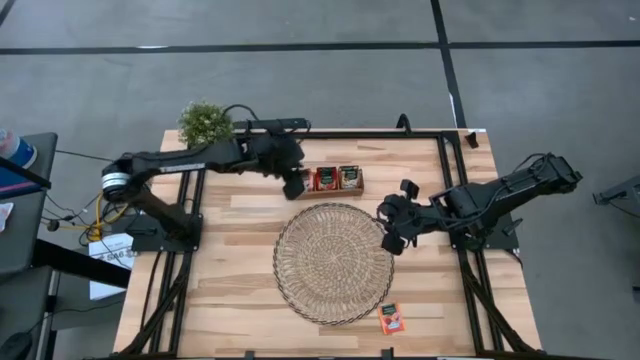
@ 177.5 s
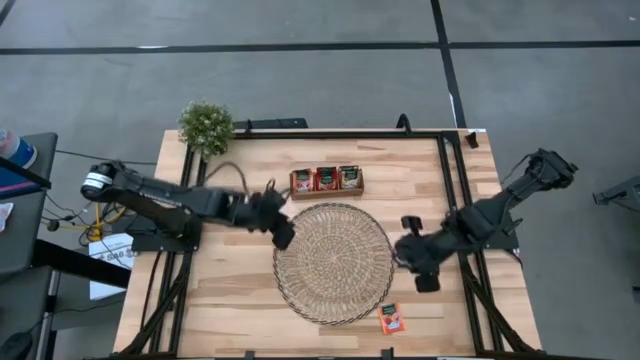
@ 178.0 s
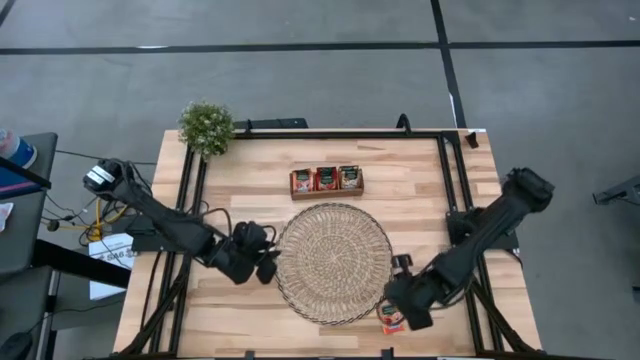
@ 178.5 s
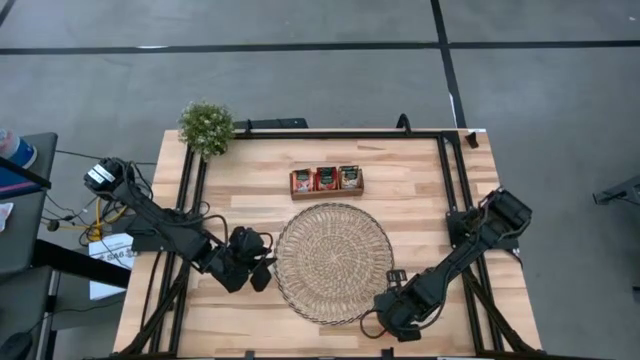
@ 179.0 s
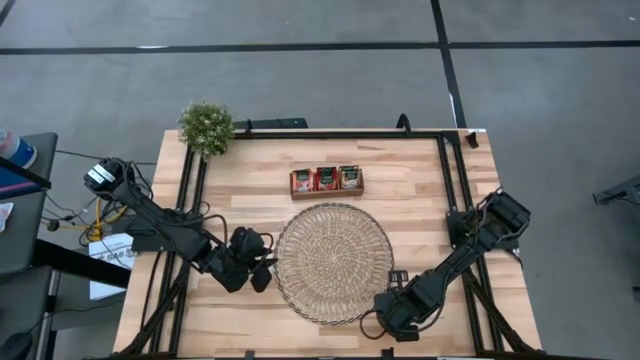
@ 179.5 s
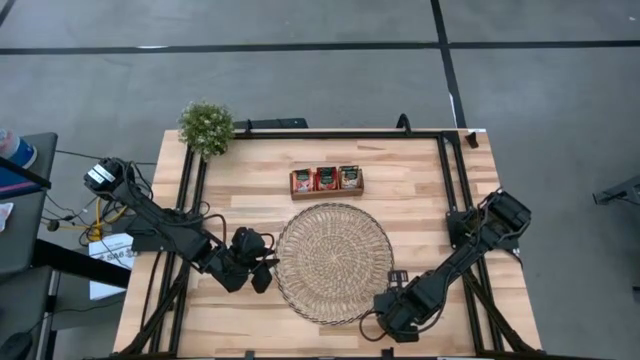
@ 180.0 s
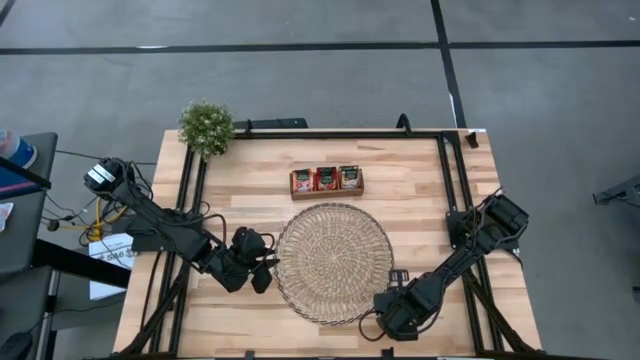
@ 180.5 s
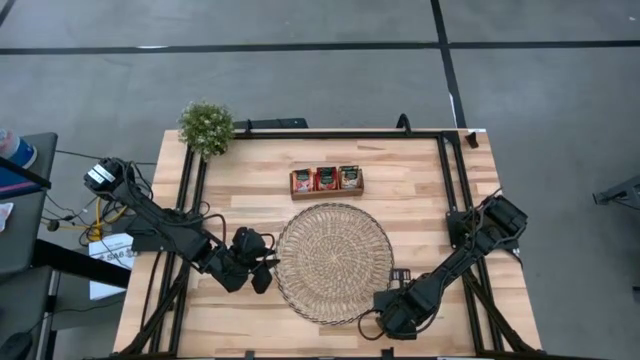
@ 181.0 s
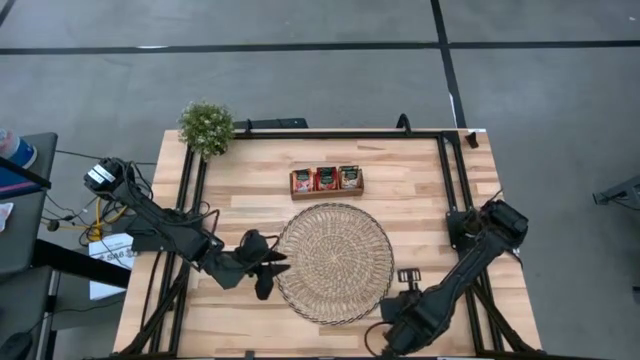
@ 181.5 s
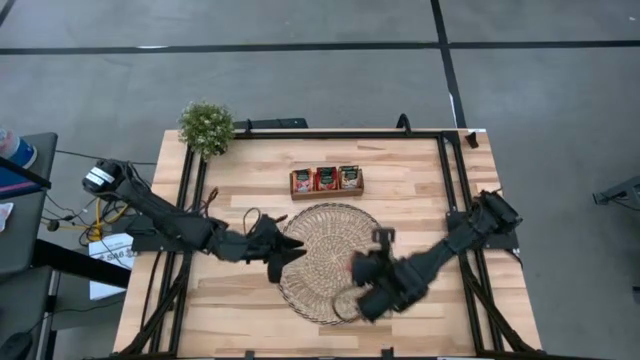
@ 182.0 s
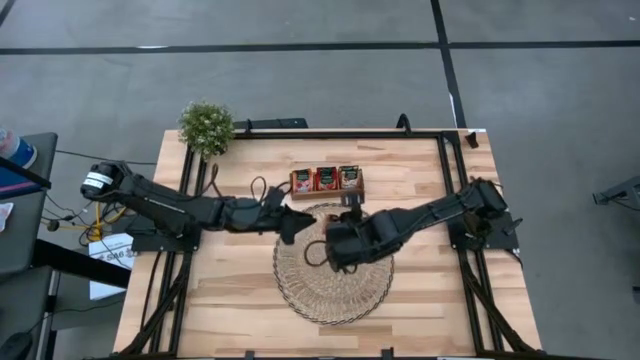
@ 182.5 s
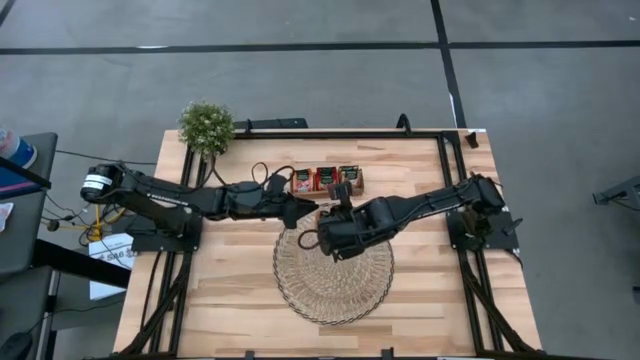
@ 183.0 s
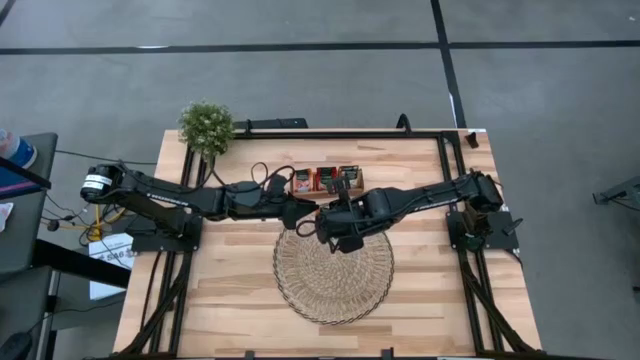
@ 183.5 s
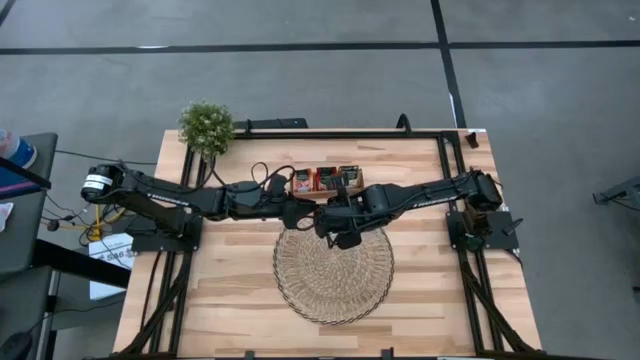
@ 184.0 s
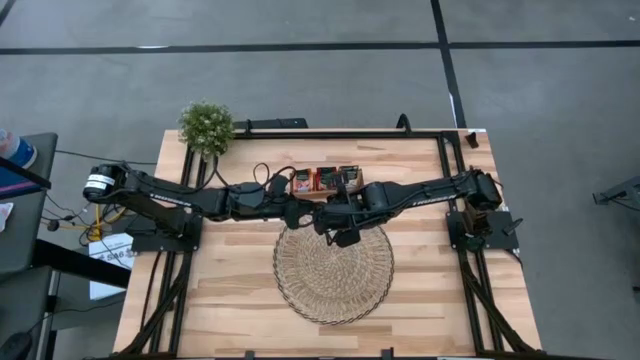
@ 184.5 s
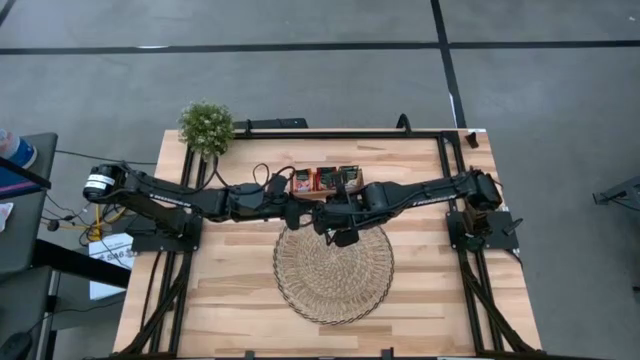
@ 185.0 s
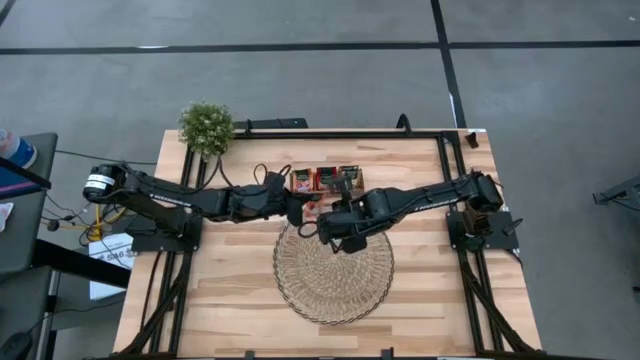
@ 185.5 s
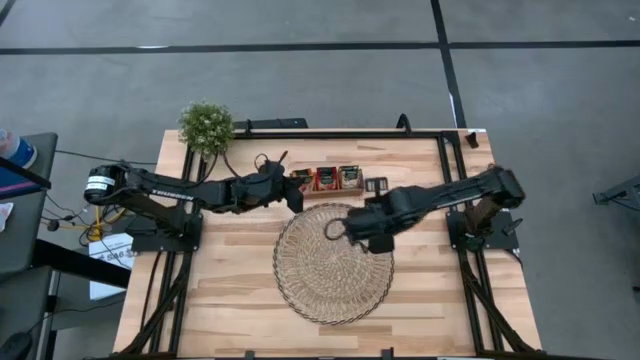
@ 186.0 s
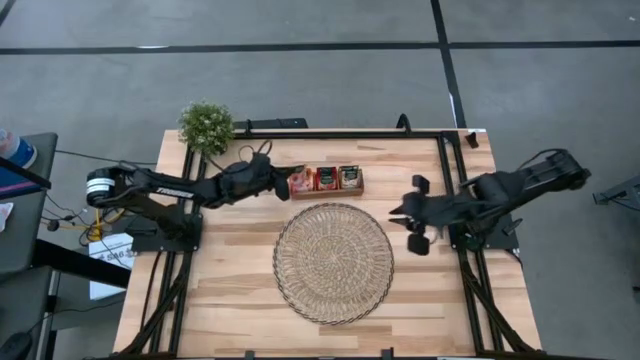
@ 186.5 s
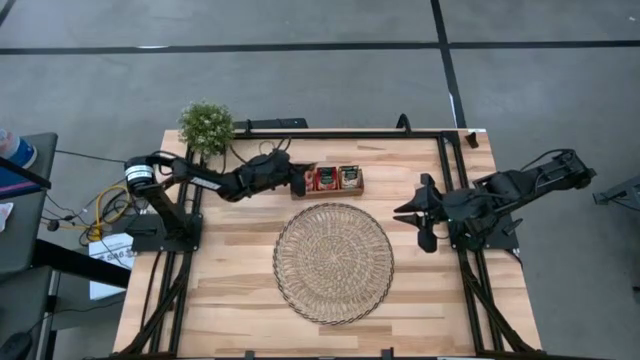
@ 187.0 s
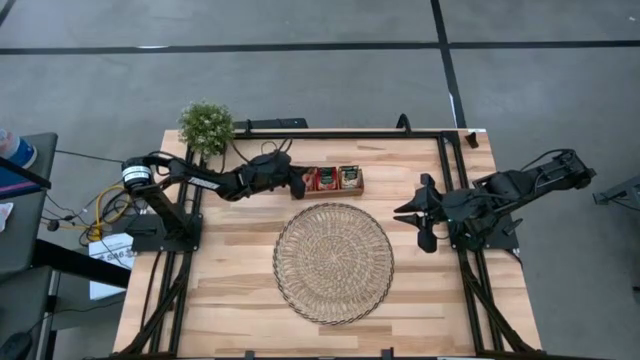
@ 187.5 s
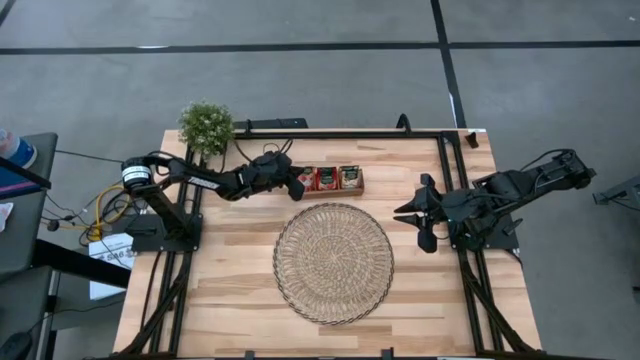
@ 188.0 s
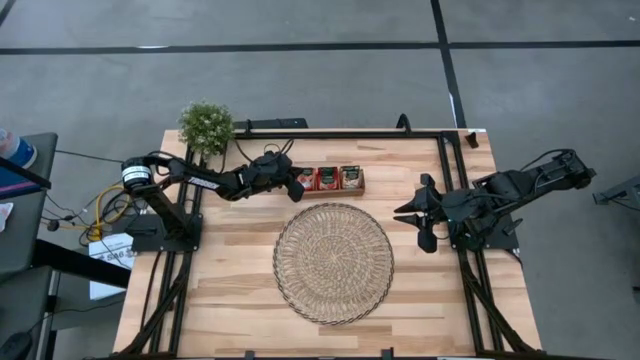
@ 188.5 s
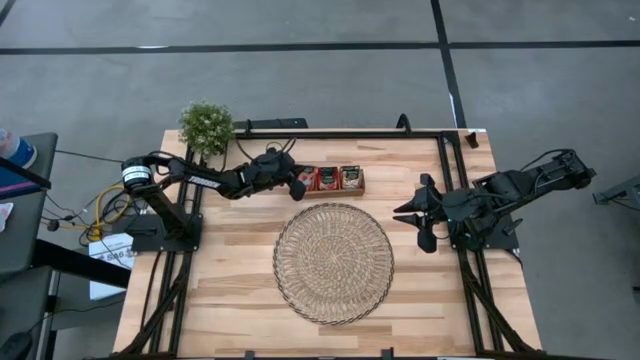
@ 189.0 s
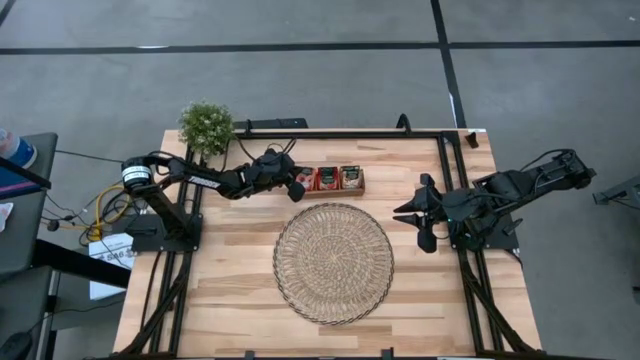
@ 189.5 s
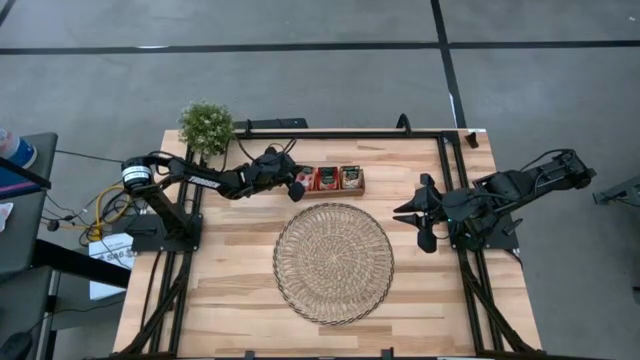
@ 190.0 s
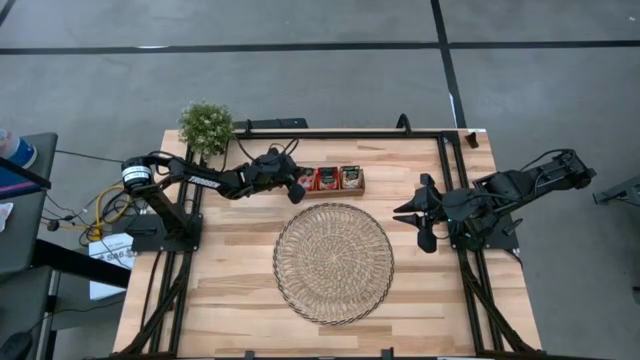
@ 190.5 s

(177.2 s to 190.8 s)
Task: Pick & Place Tea
Put the orange tea bag into the left section of the wooden organizer

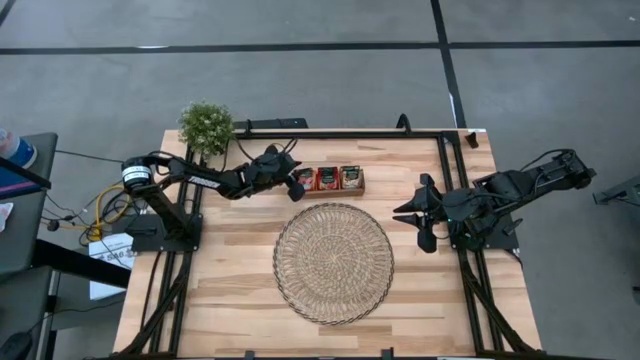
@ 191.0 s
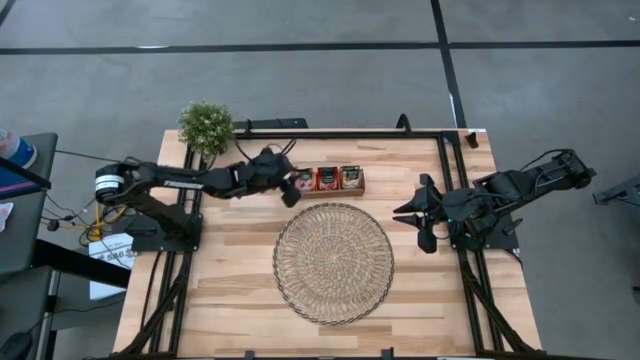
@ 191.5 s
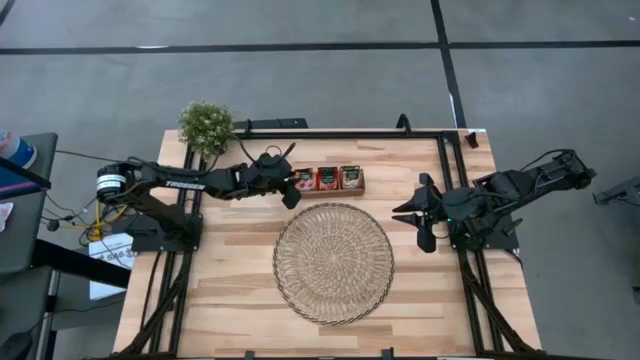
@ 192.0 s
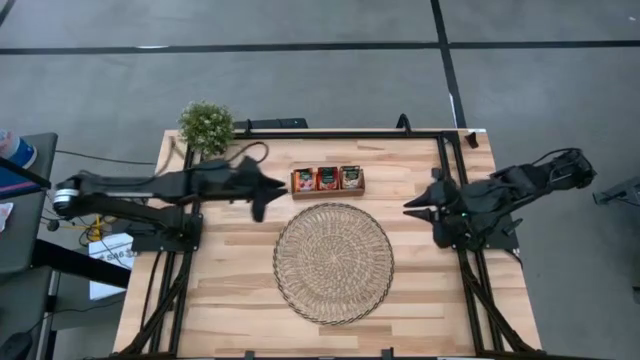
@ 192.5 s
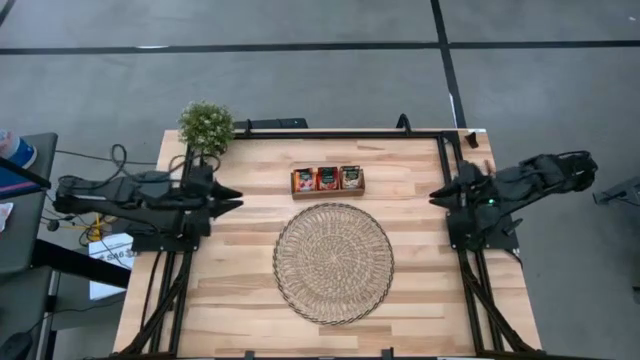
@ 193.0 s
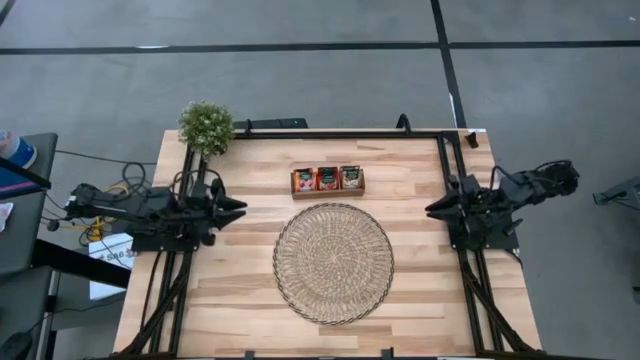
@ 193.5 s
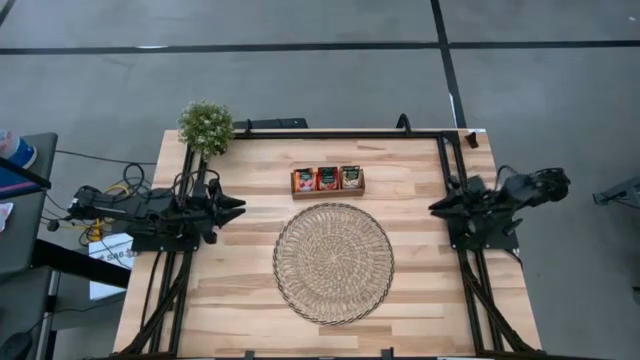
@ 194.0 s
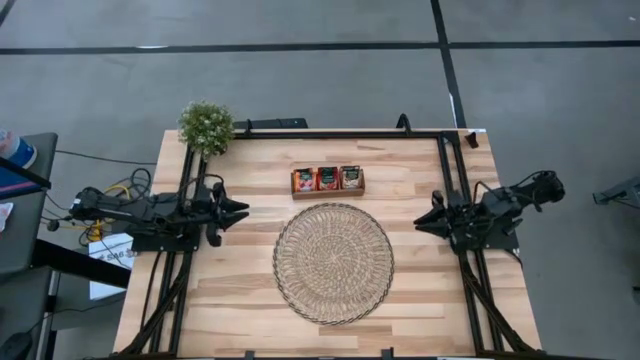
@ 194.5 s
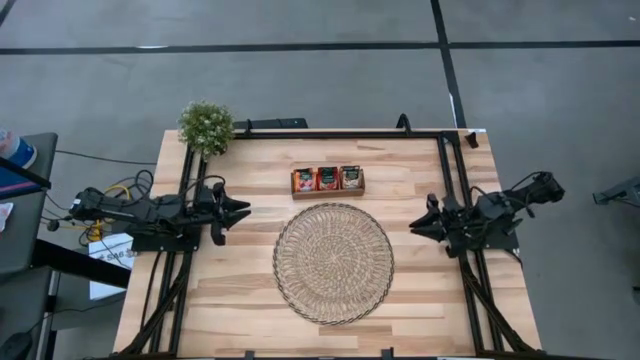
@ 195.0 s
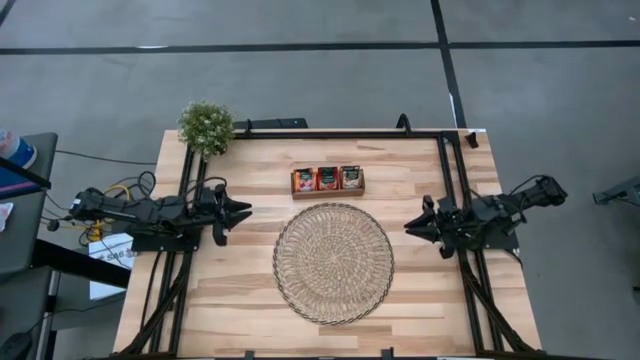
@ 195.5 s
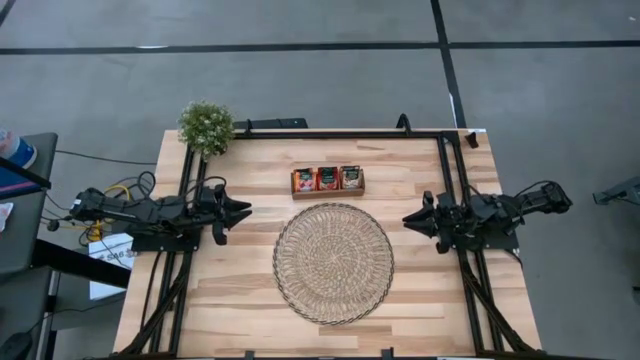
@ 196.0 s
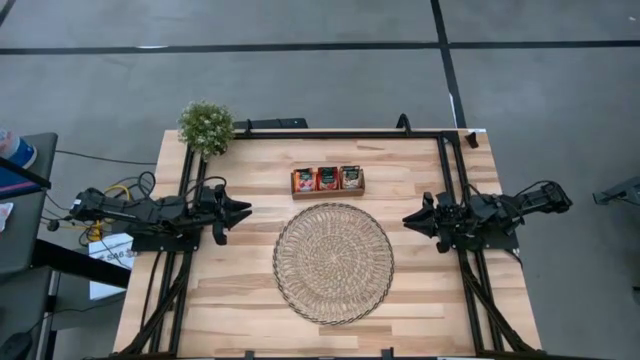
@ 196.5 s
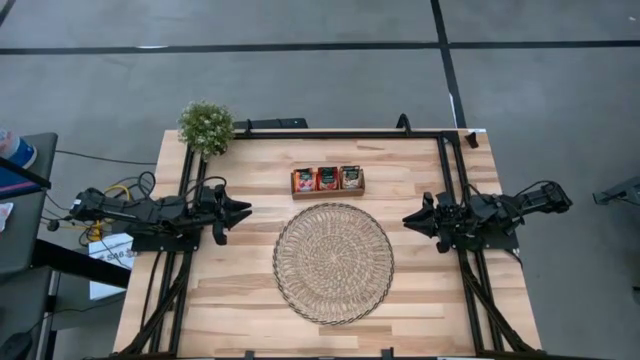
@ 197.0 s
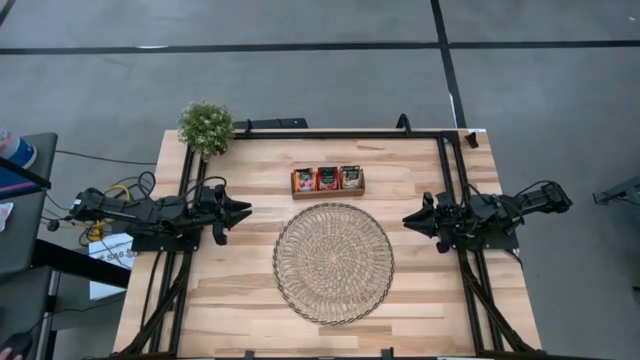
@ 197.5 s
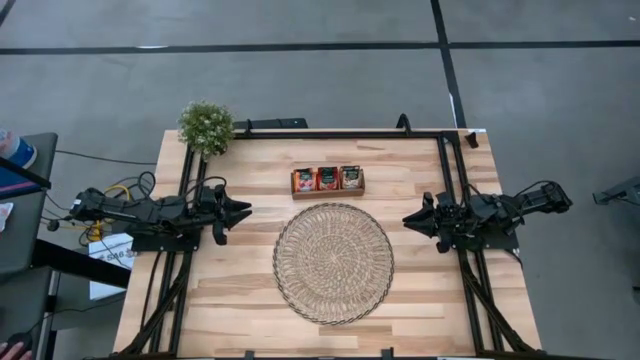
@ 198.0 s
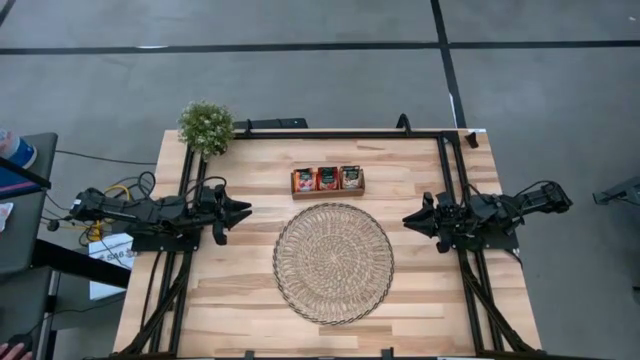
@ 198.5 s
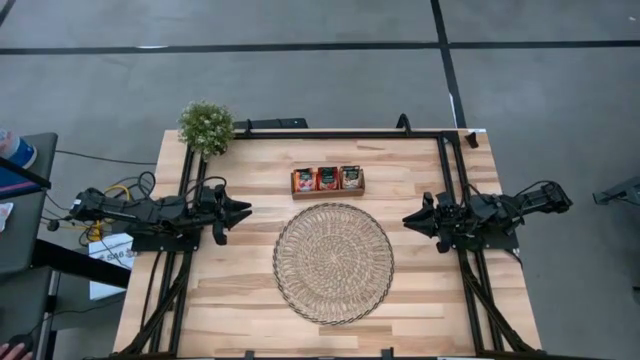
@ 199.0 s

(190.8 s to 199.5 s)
Return to Home Position
